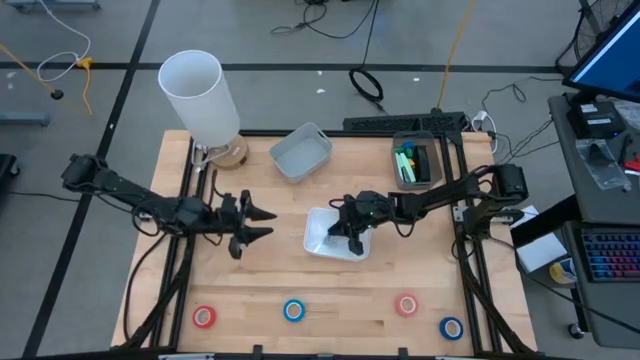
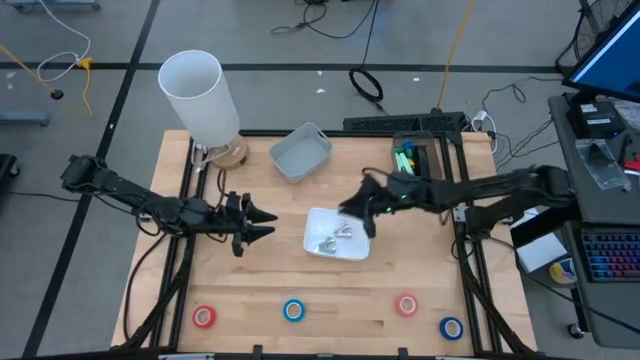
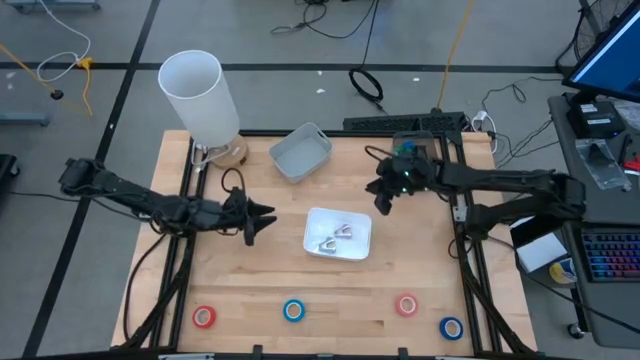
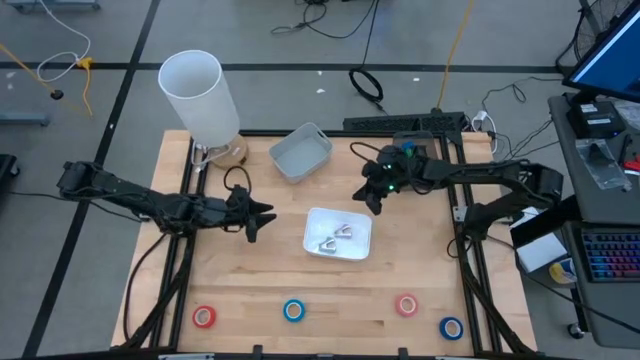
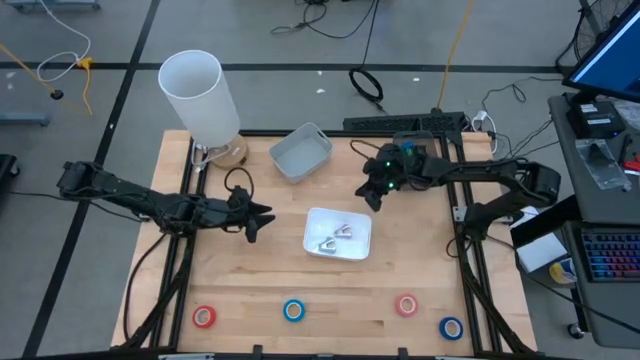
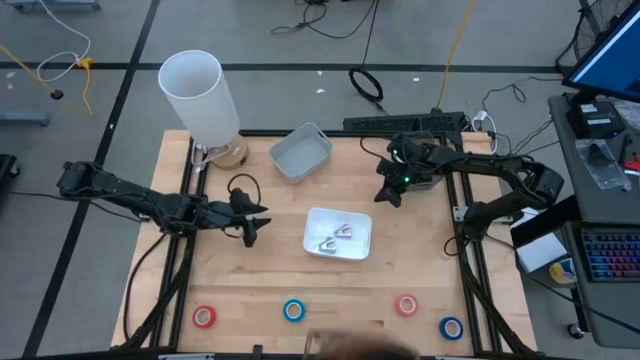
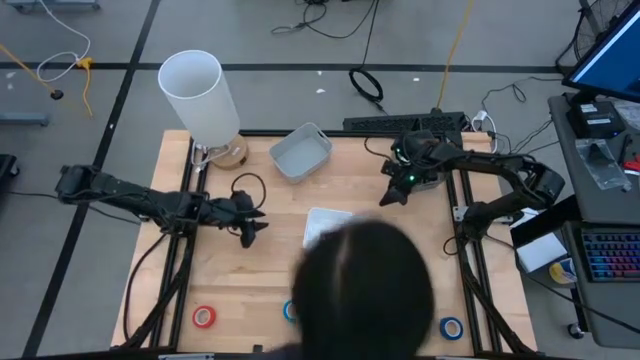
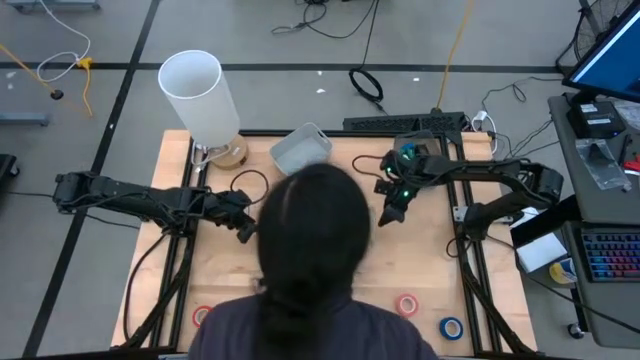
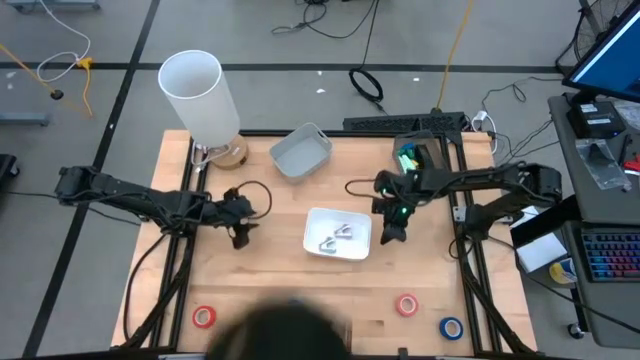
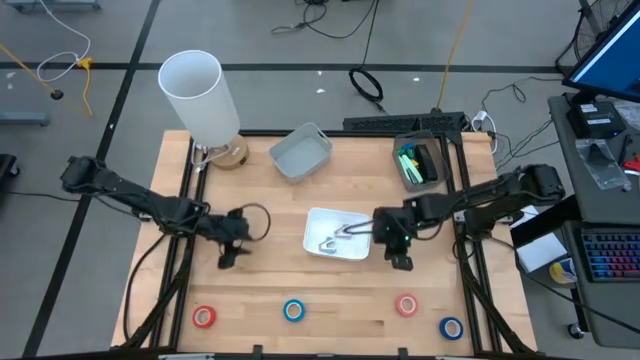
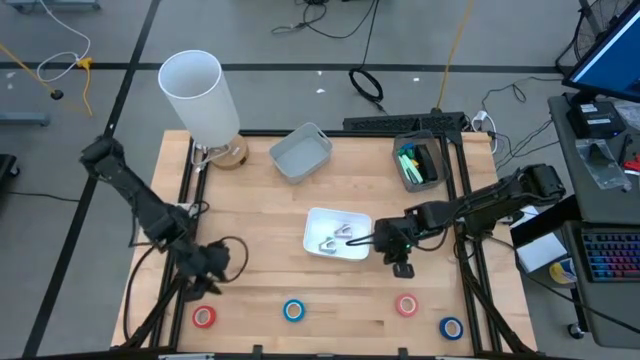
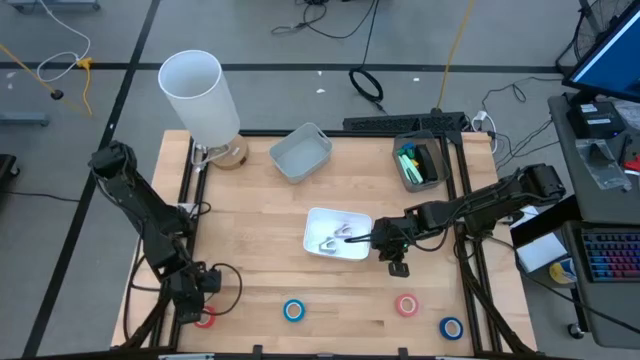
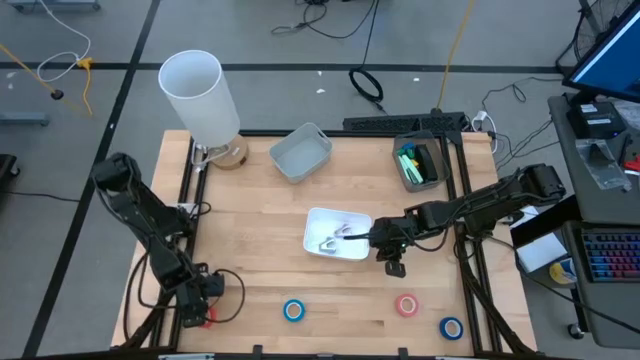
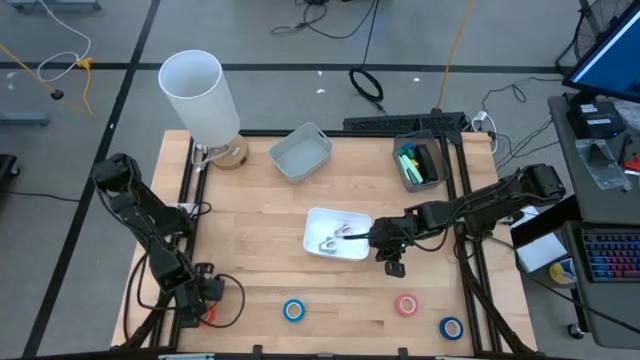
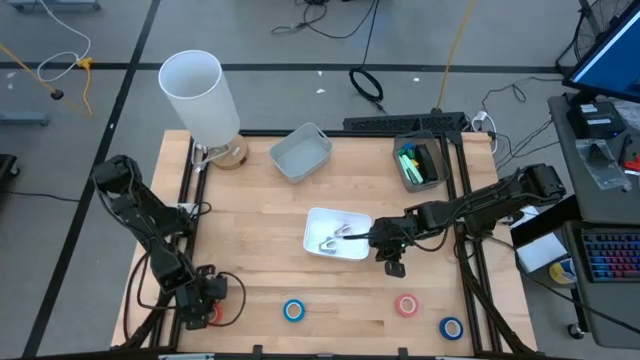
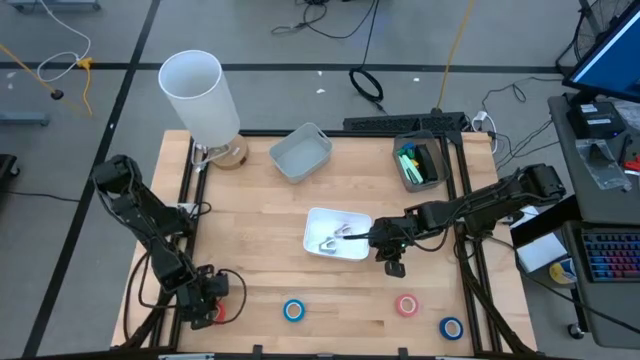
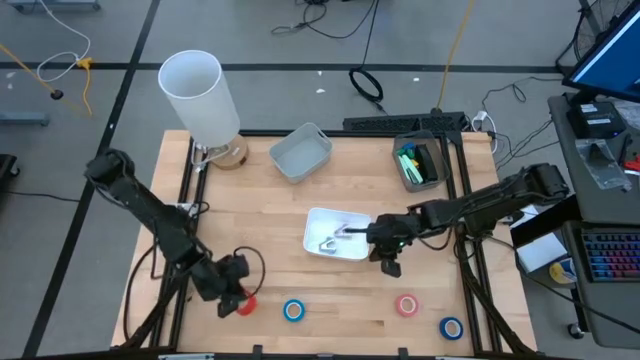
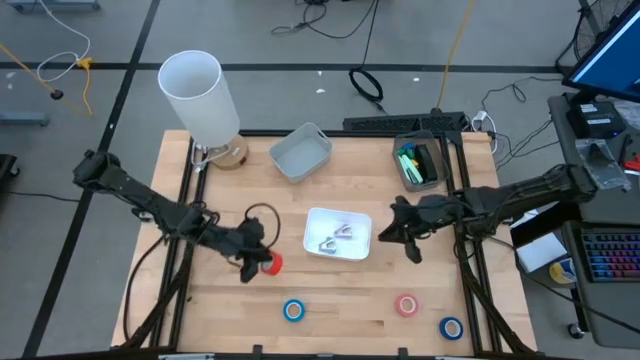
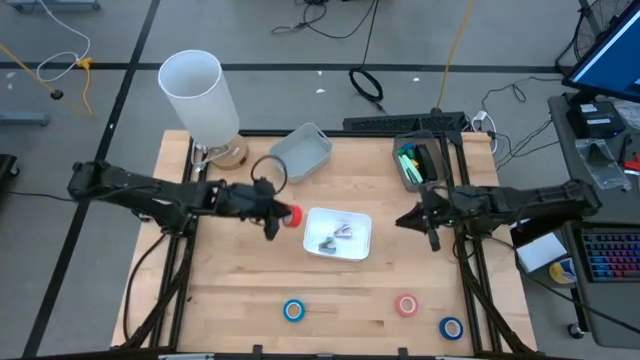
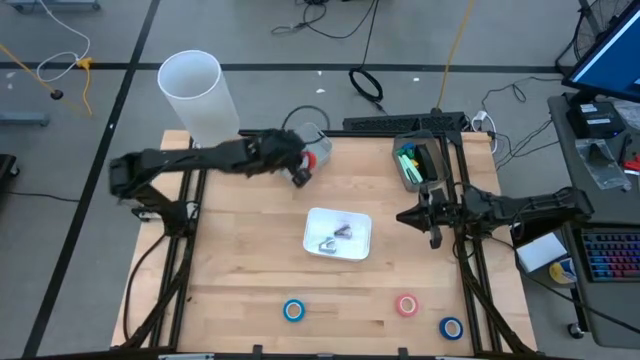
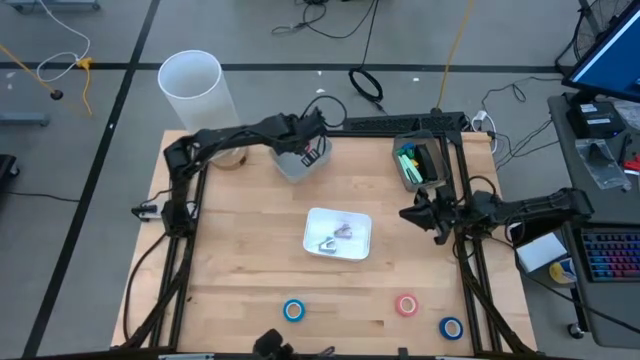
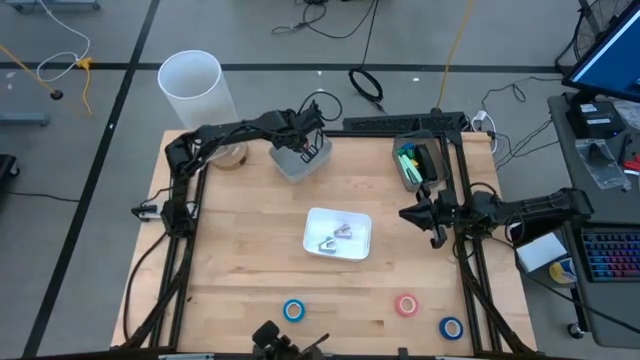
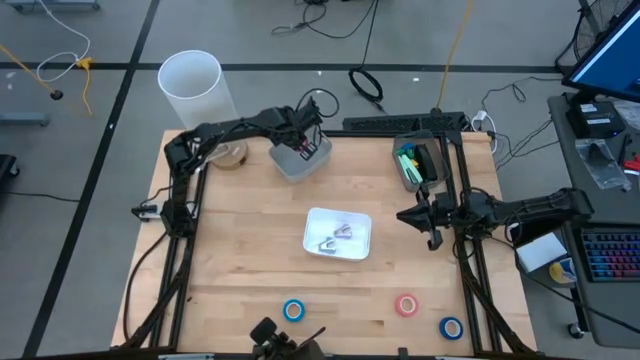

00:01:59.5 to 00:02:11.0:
Task: Pick and place Stapler, Stapler remover, tape
Put the red tape into the gray bin

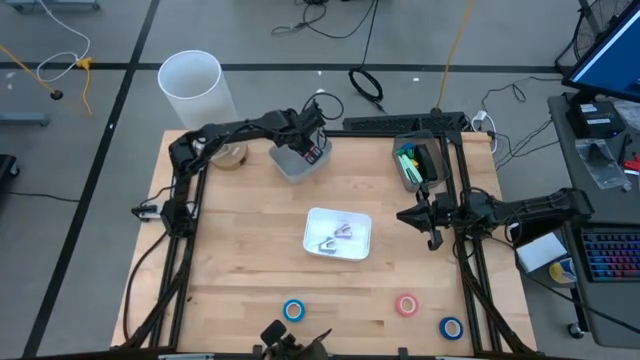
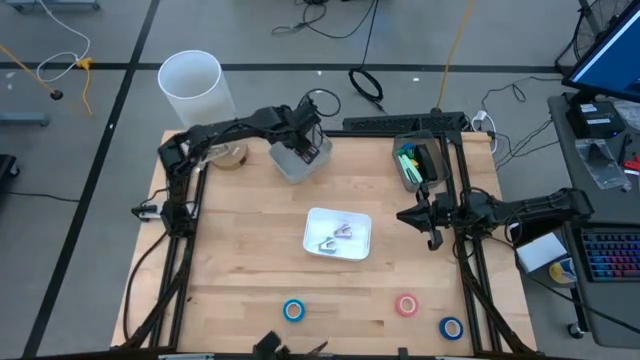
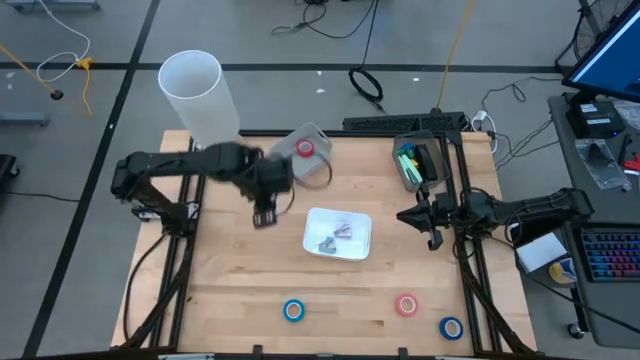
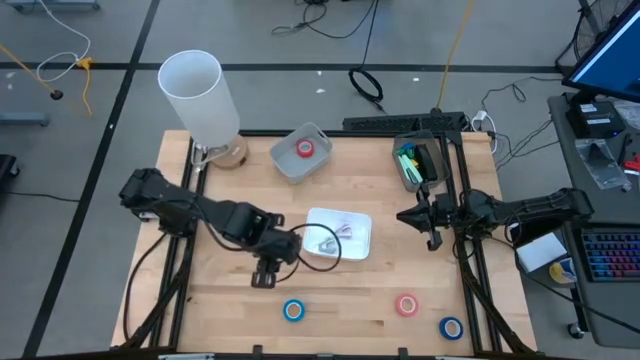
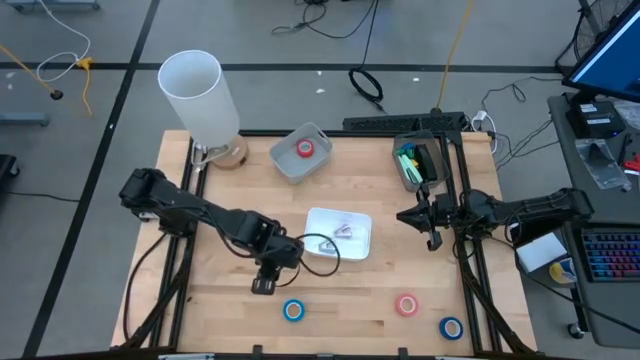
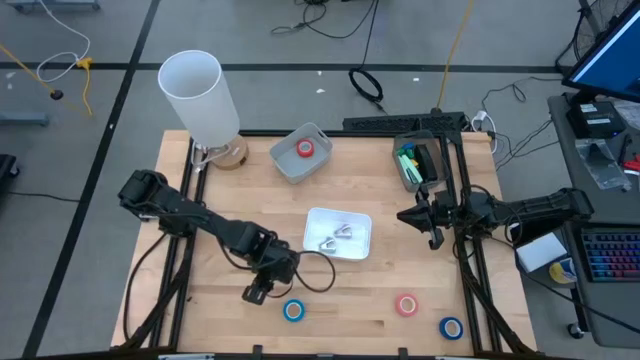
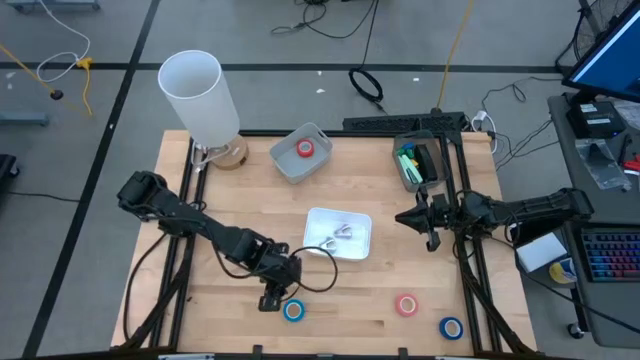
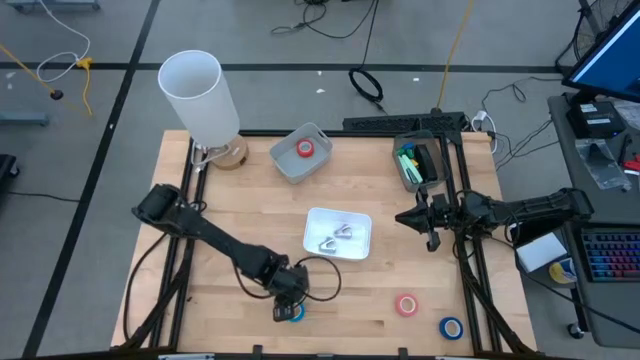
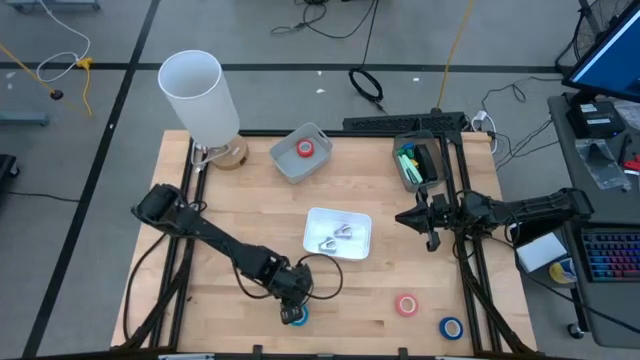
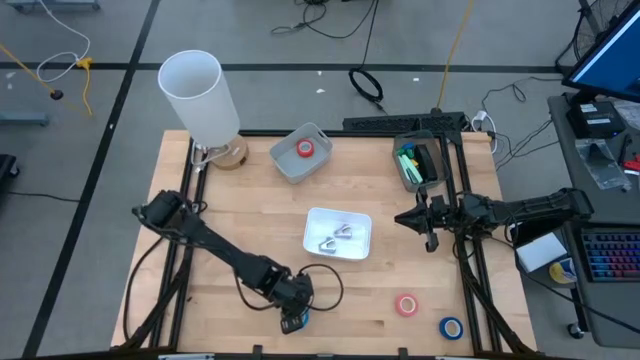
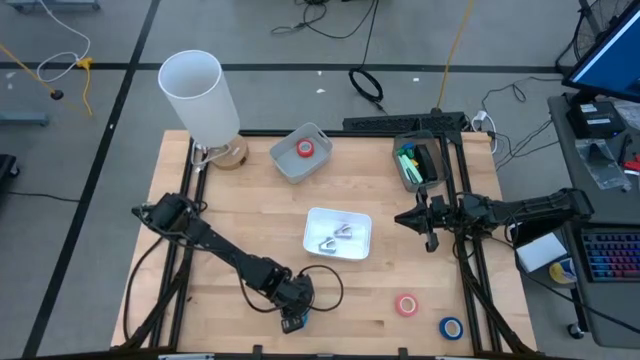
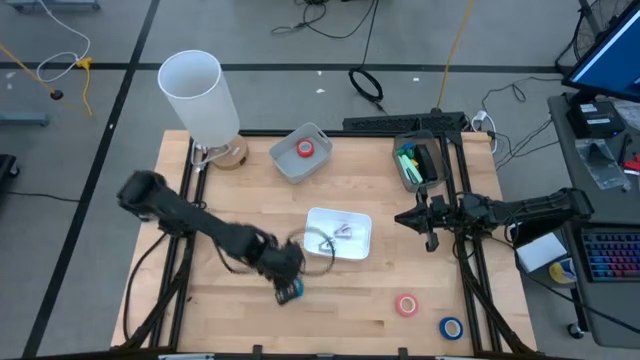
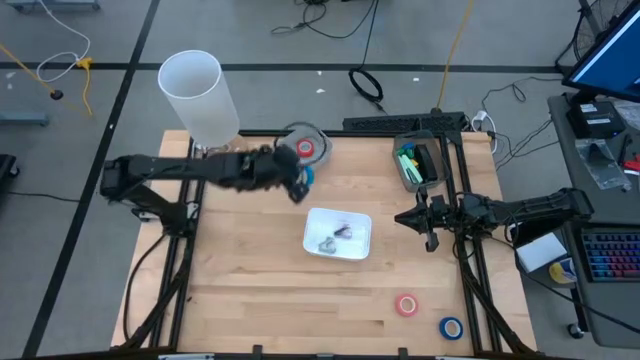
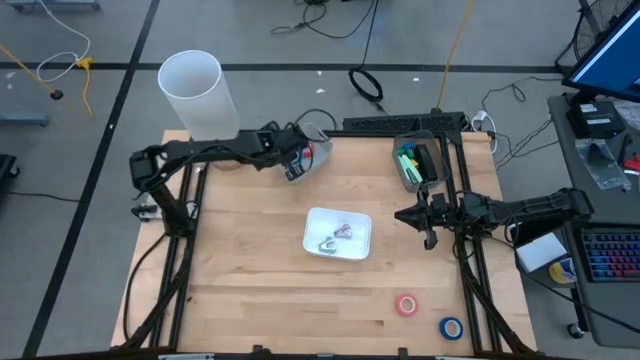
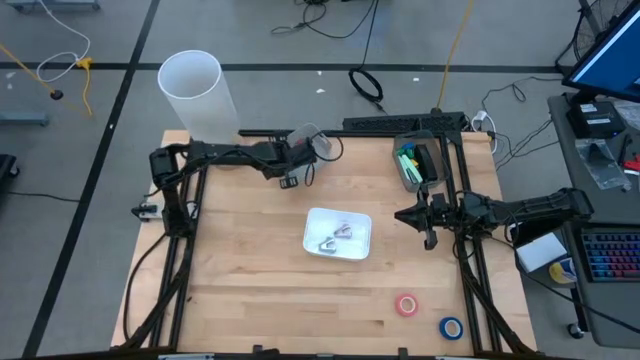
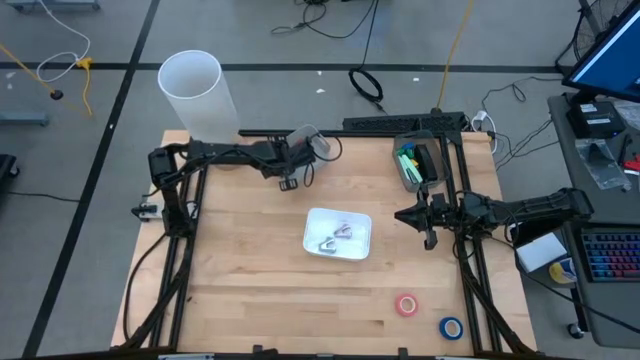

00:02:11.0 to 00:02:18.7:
Put the blue tape into the gray bin

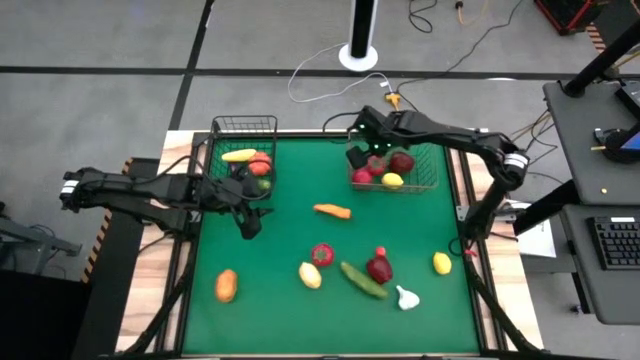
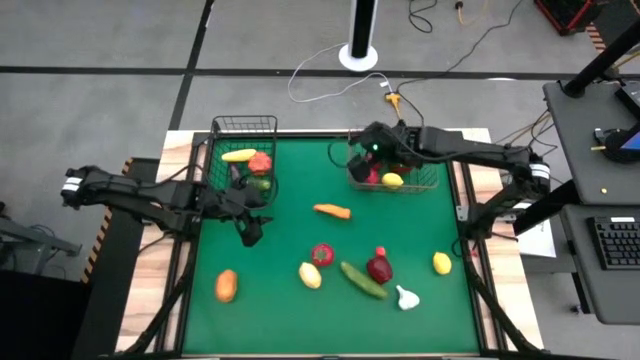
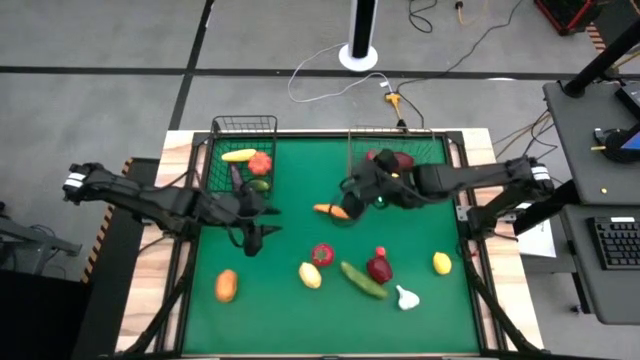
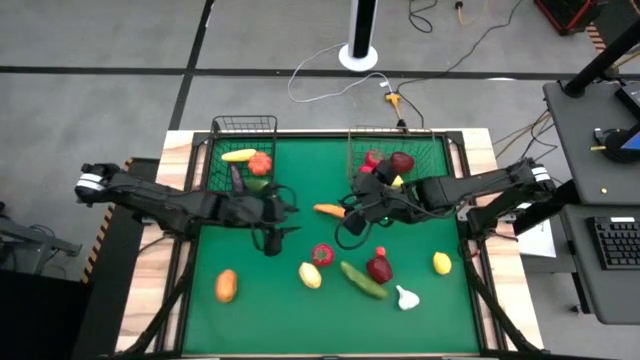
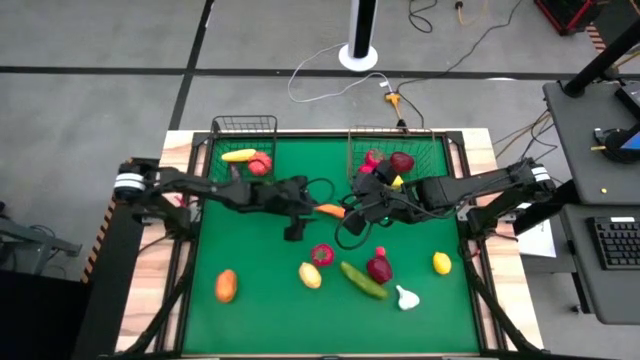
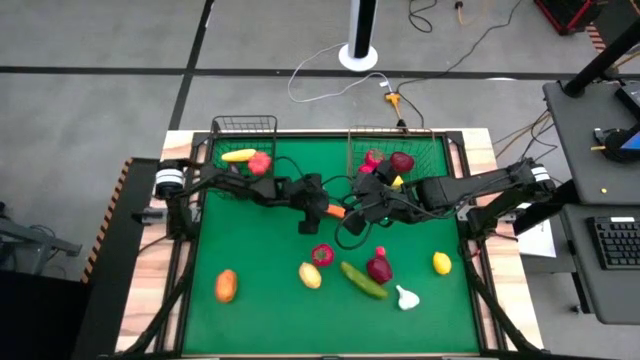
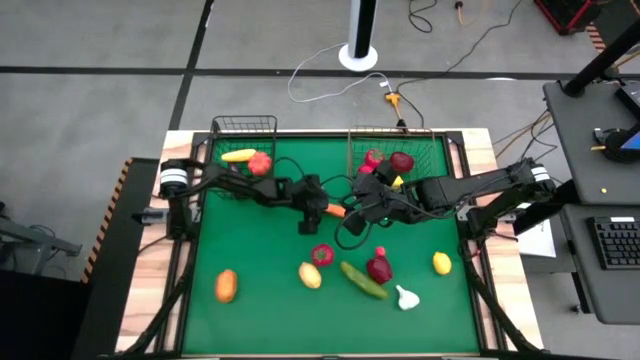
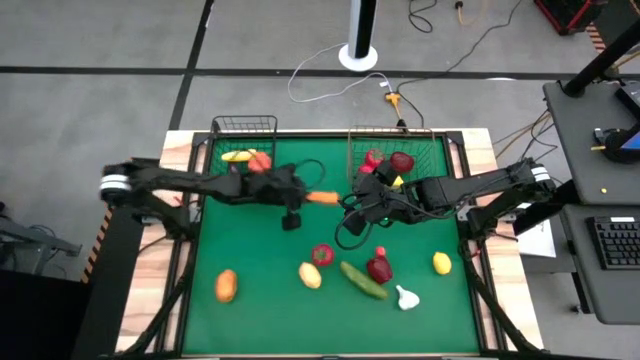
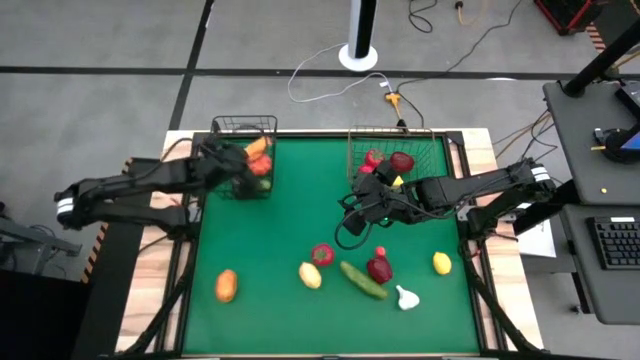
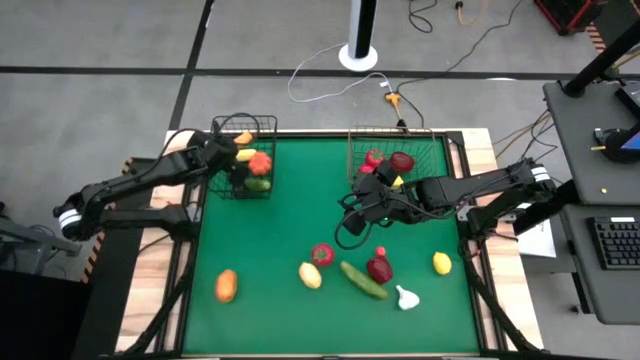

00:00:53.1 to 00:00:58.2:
Task: Sort produce into baskets
Put the orange chili pepper into the left wire basket
